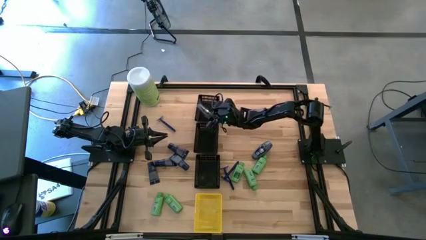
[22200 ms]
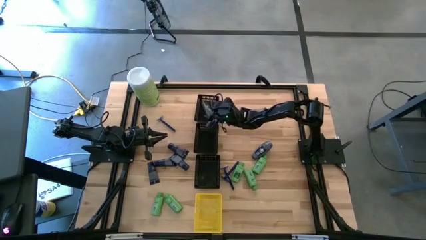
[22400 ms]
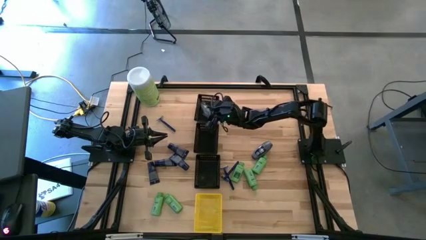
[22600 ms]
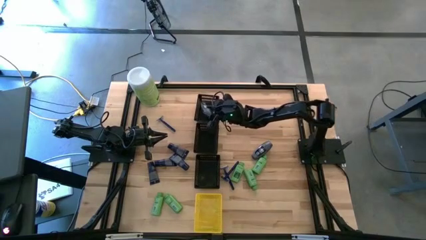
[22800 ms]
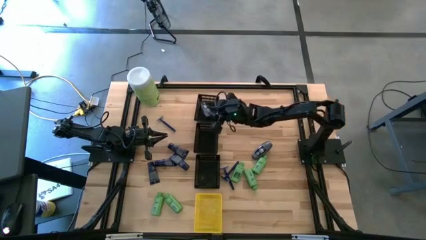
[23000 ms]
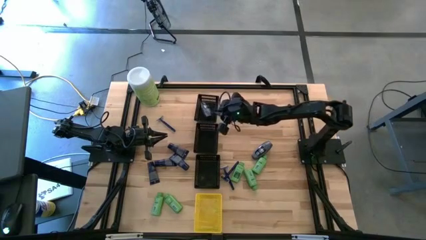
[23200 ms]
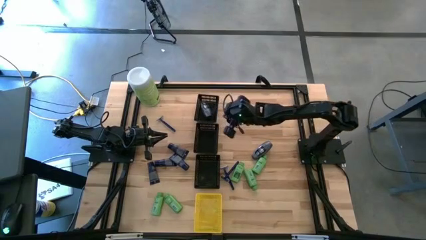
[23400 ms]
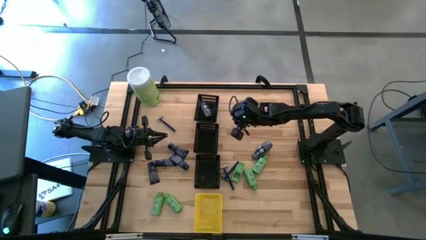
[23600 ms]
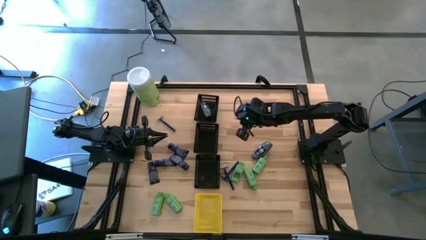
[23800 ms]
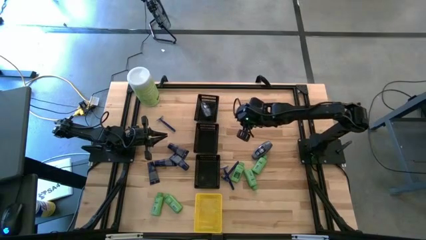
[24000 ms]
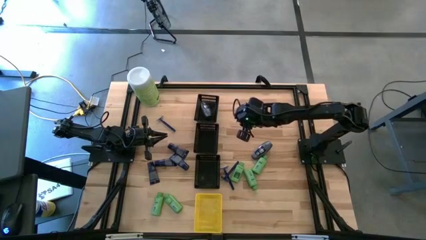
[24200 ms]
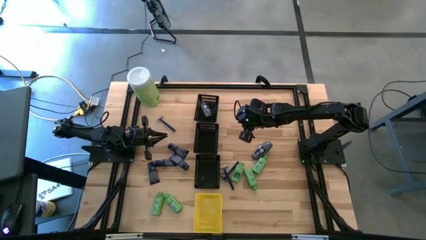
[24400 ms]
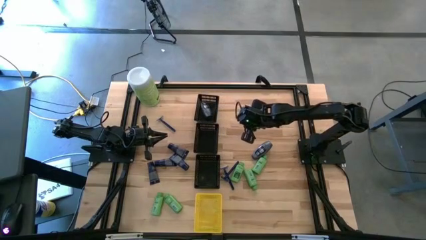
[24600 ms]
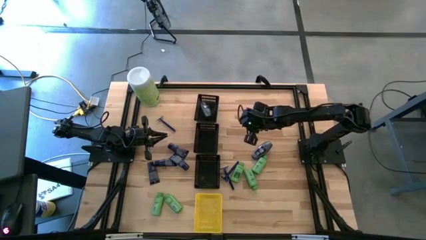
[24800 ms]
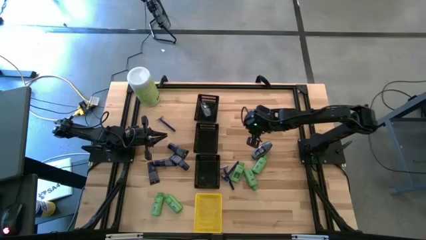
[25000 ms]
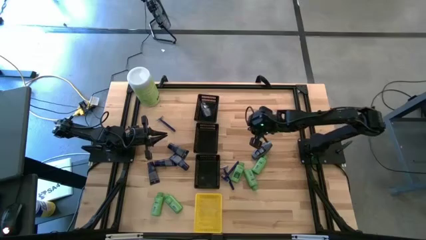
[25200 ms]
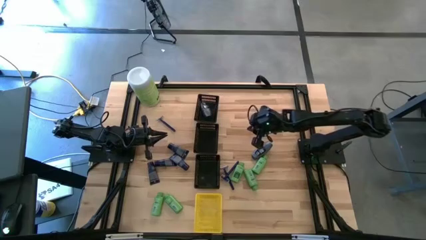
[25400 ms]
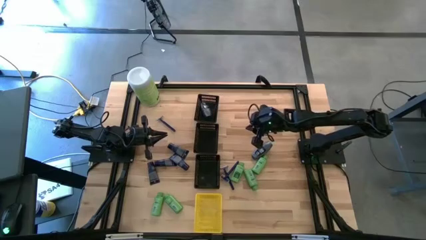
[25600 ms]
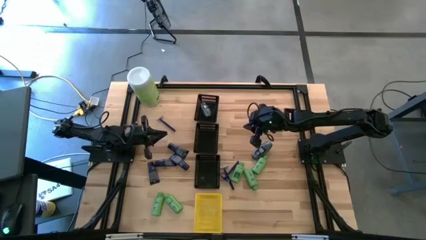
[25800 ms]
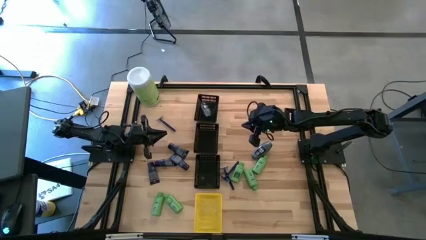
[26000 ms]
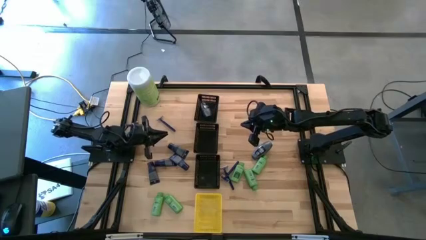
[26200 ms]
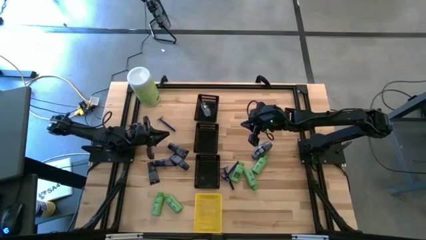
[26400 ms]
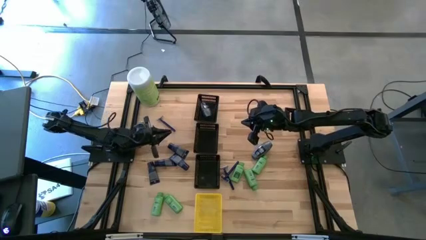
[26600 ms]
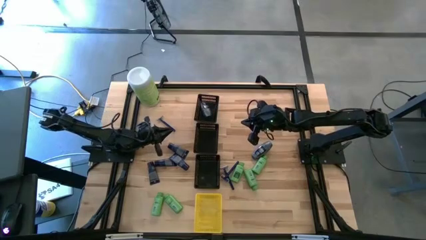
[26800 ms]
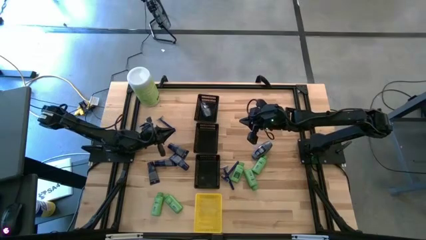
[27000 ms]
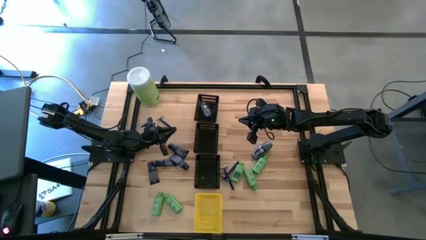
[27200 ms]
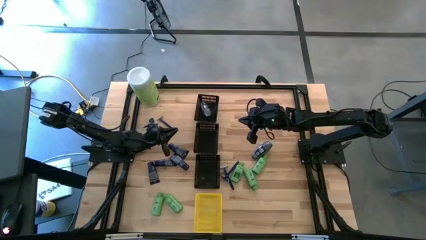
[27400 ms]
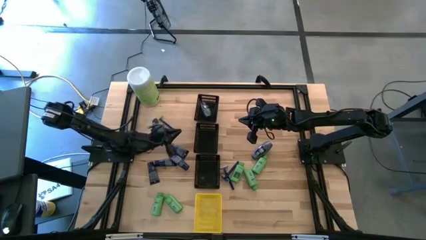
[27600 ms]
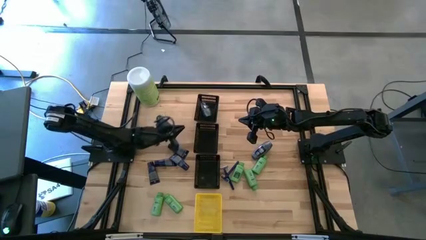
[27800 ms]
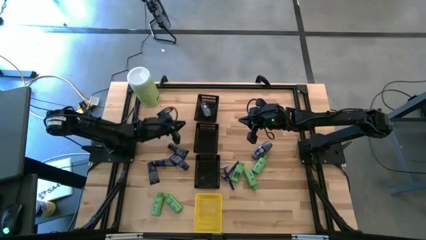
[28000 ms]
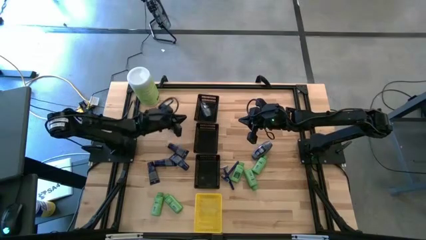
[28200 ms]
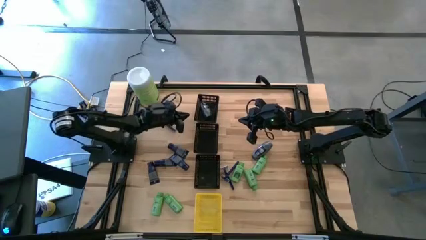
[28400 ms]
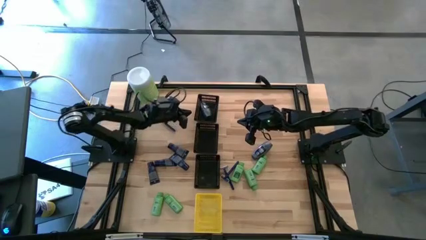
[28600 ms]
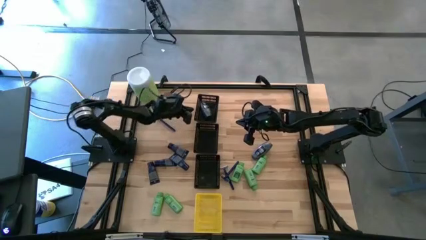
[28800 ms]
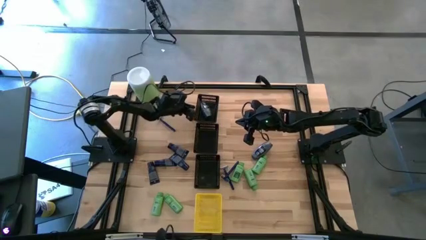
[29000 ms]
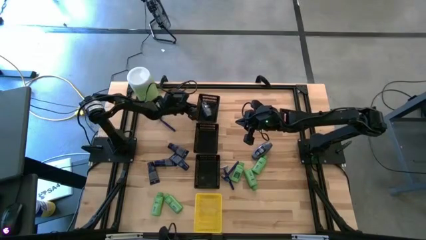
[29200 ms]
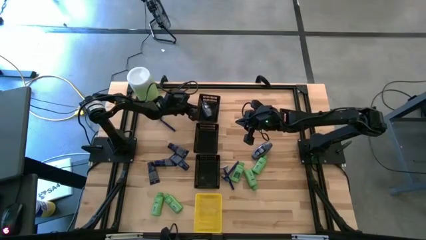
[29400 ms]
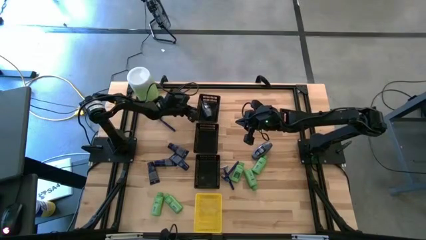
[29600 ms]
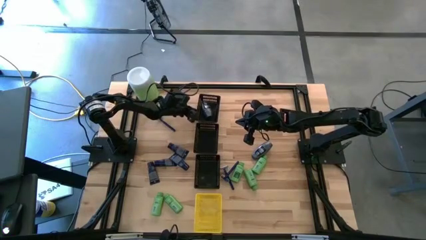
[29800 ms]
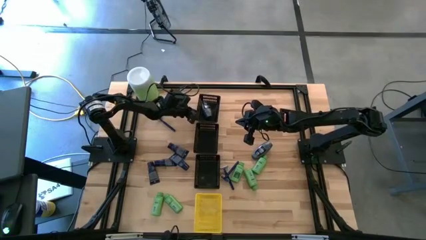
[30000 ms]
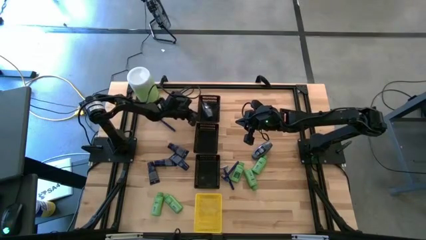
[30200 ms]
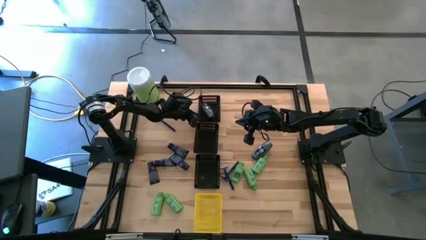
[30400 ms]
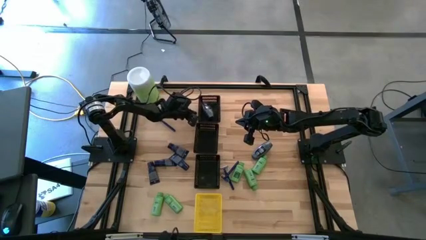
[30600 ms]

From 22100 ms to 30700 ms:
Task: Pick & Place Travel size toiletries
Adjust the top black bin

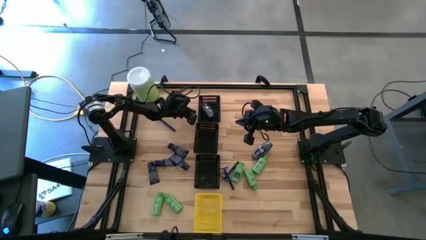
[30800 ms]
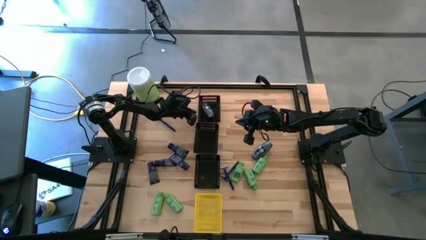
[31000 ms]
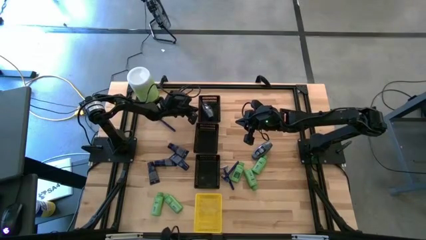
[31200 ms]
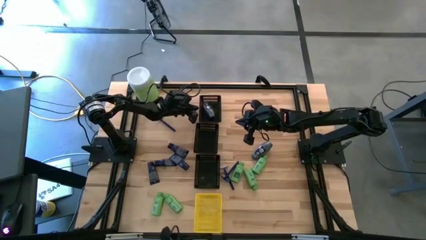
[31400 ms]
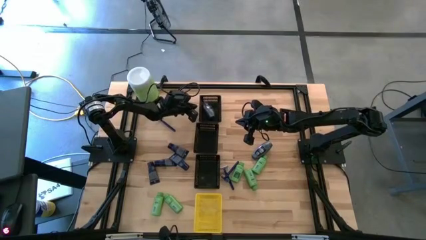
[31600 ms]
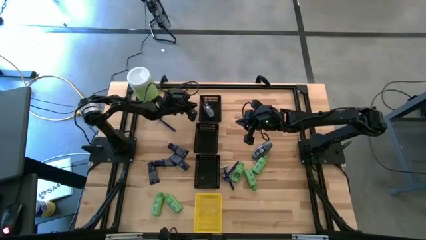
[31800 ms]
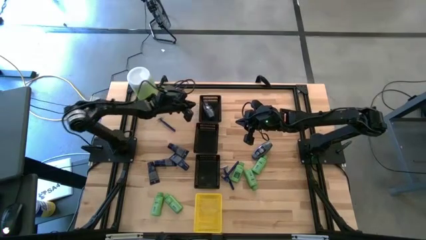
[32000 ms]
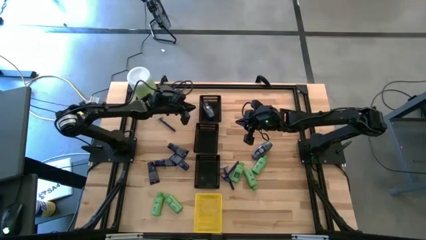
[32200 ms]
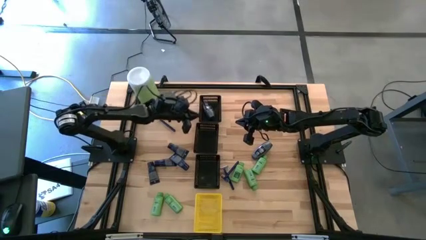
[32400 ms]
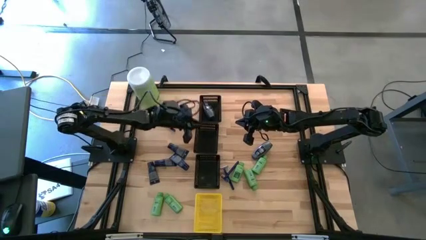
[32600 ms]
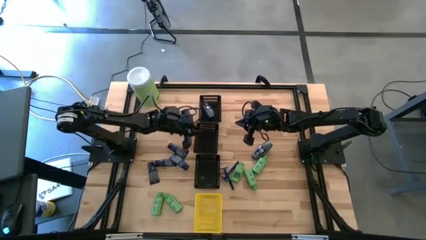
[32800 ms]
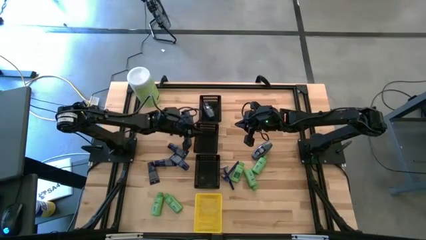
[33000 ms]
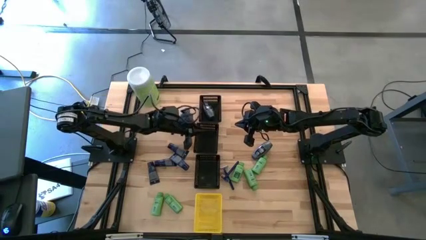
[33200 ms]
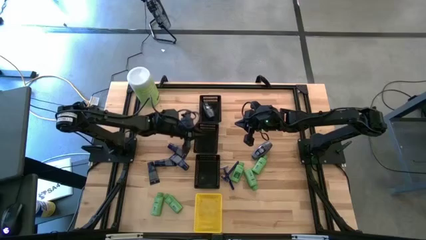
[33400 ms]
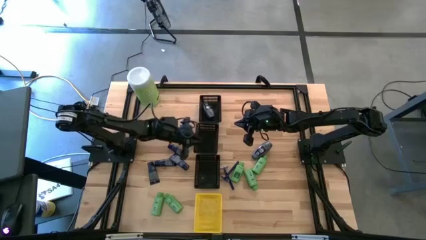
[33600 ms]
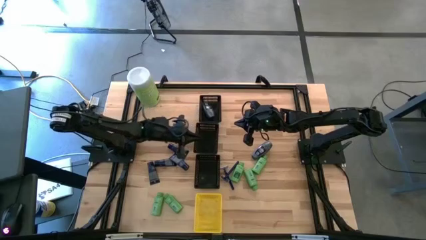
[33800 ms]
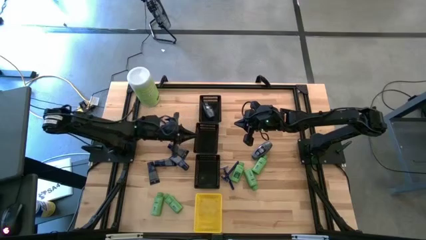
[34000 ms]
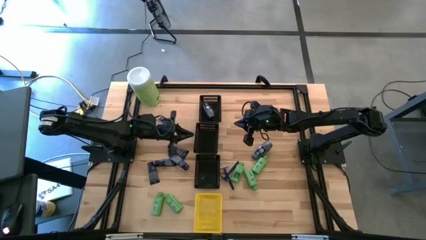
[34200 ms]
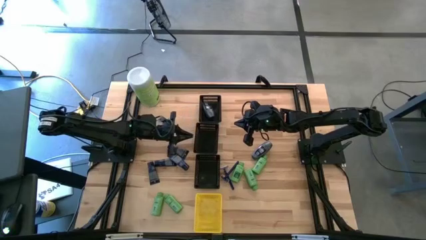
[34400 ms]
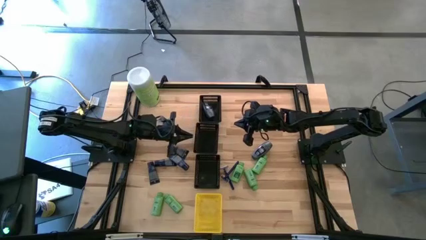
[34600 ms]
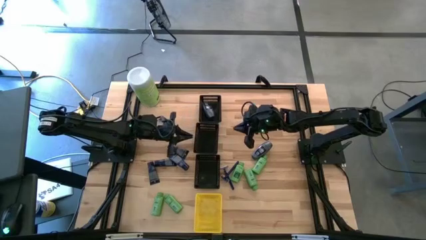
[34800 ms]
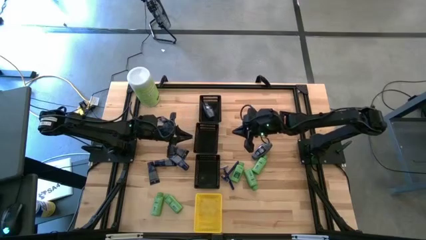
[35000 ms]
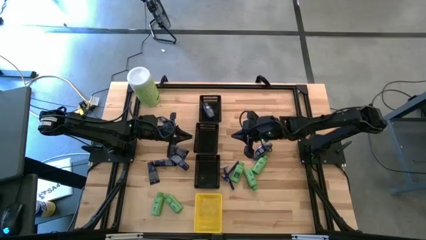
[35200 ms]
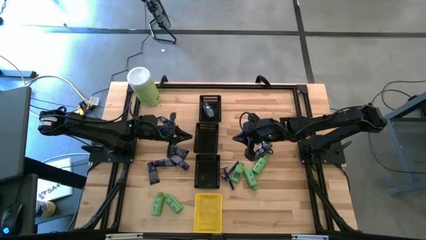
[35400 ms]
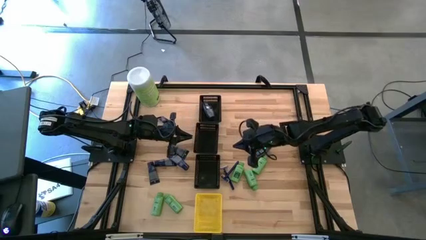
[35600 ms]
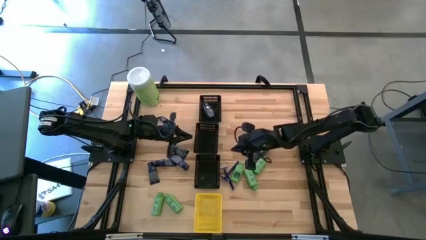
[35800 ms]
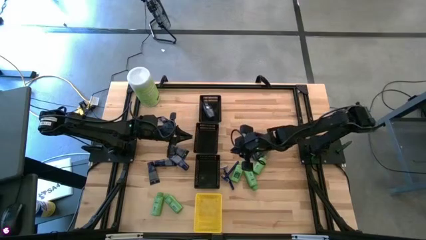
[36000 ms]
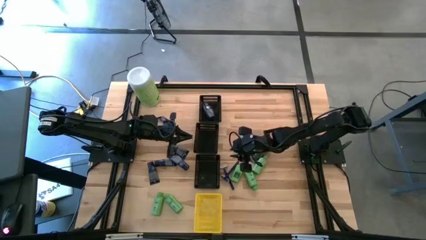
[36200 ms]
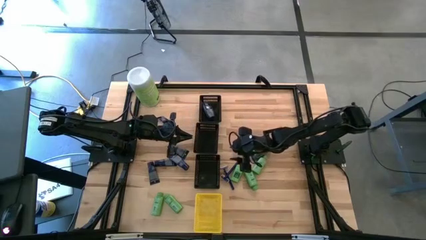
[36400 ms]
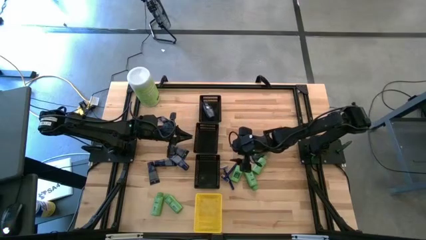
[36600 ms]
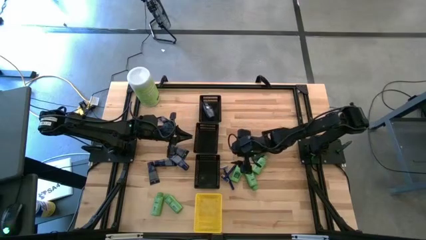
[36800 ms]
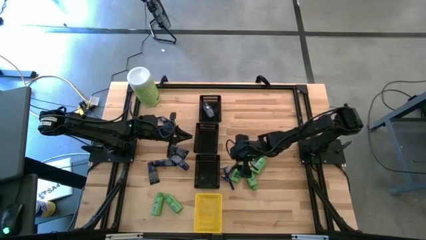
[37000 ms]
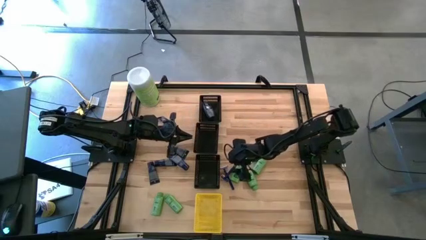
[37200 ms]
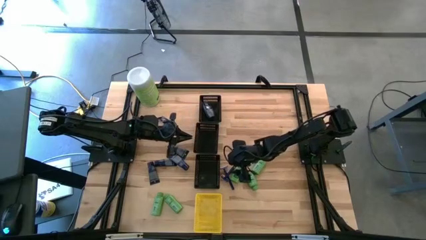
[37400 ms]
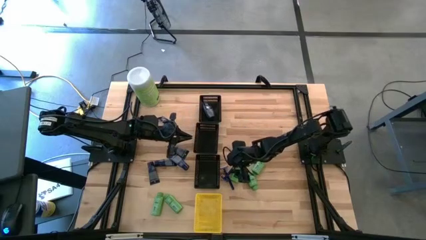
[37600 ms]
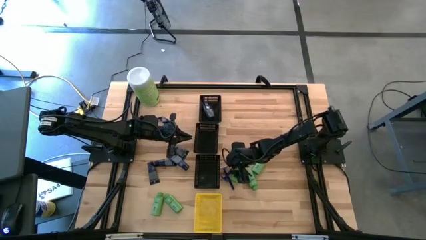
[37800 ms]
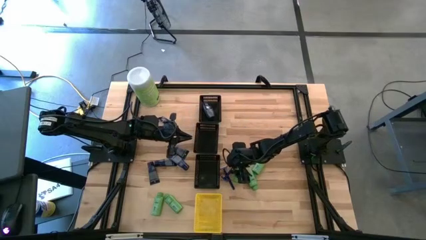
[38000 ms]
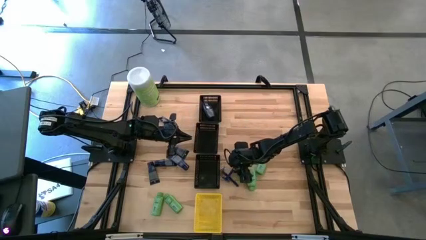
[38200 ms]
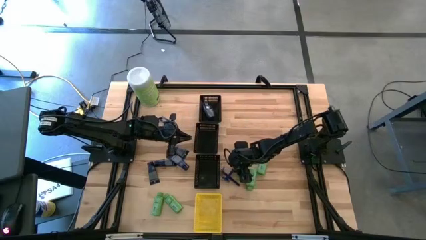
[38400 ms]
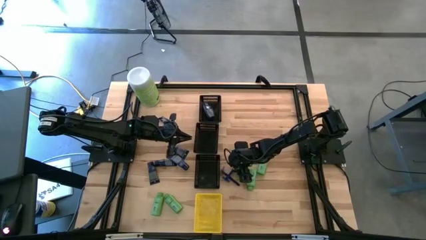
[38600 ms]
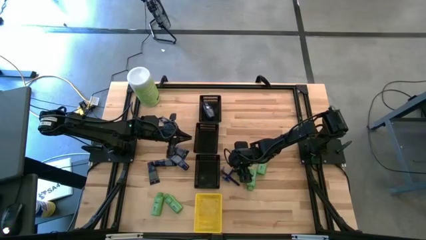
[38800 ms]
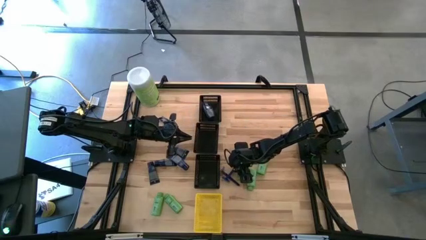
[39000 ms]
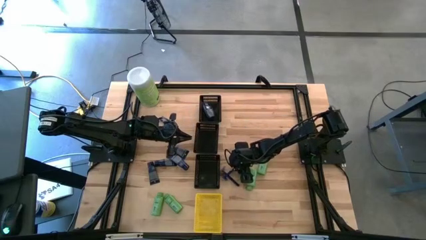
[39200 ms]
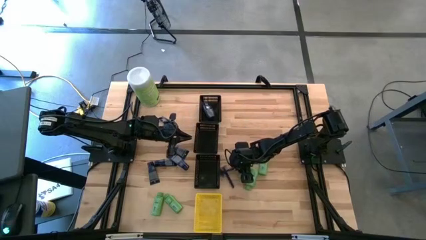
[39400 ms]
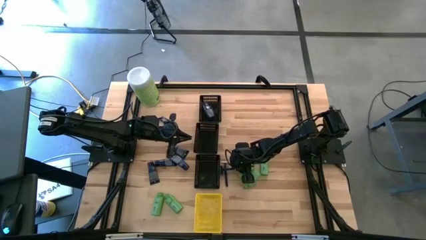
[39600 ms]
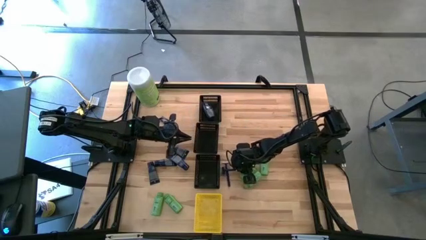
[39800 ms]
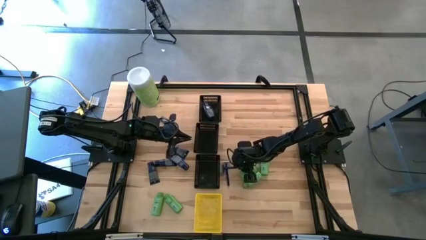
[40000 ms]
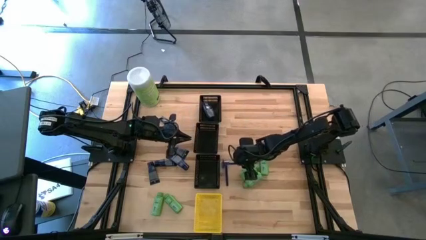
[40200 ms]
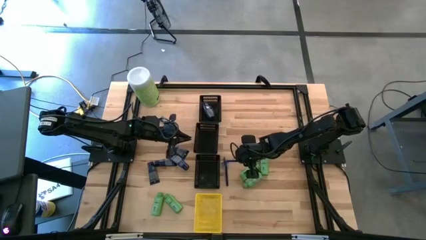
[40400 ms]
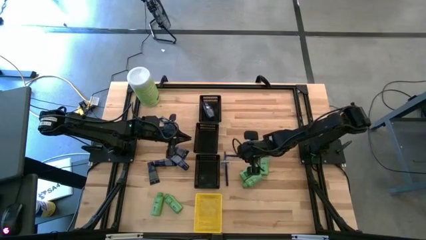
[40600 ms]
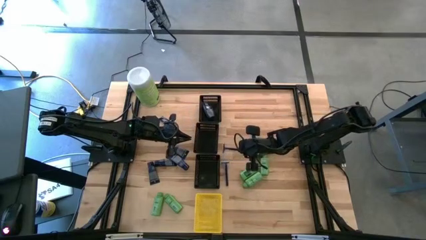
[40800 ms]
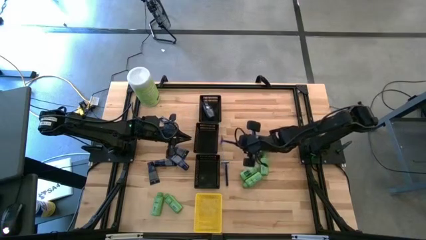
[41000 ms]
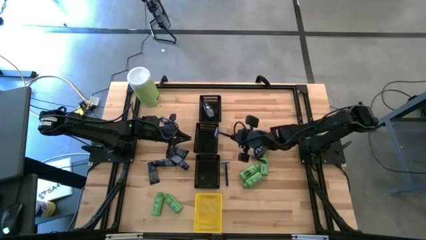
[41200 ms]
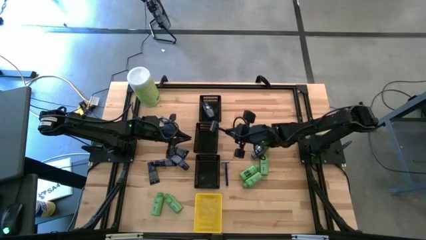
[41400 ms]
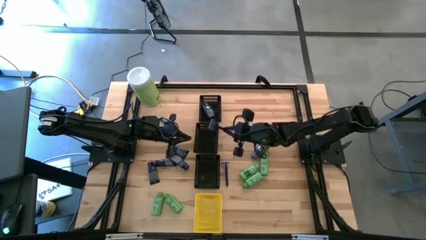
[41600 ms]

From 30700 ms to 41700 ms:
Put the blue razor into the yellow bin
